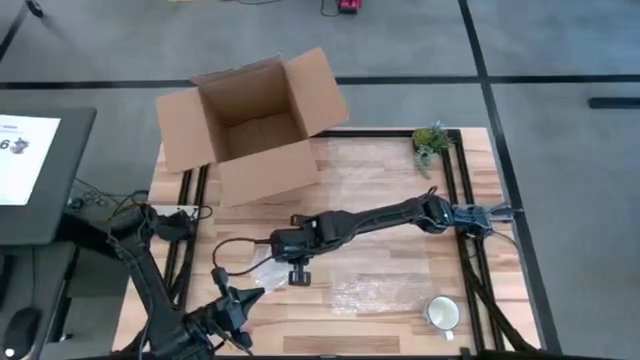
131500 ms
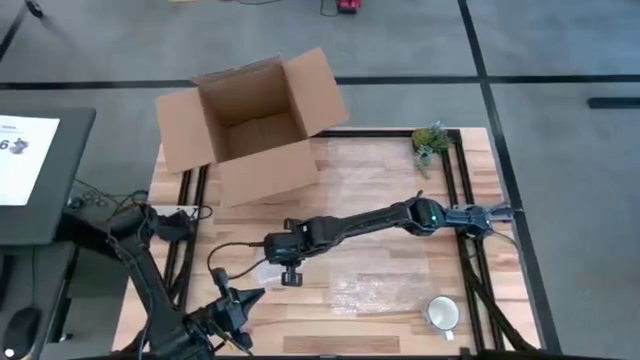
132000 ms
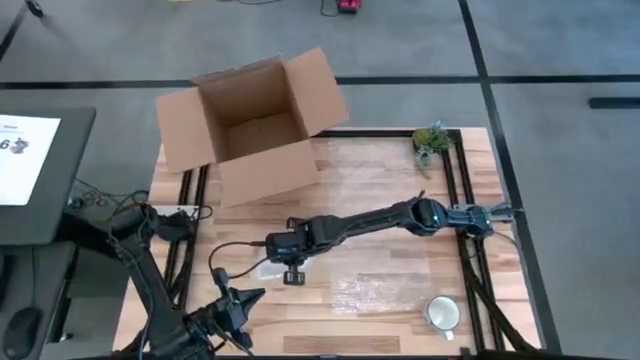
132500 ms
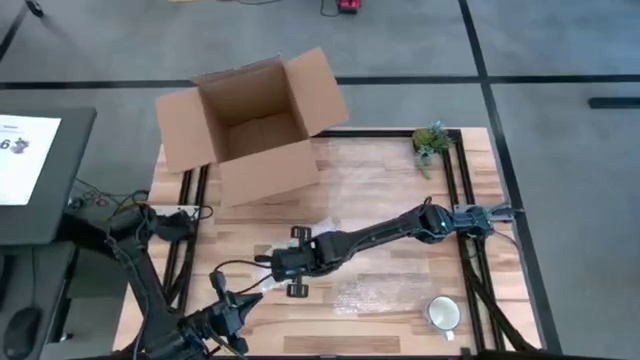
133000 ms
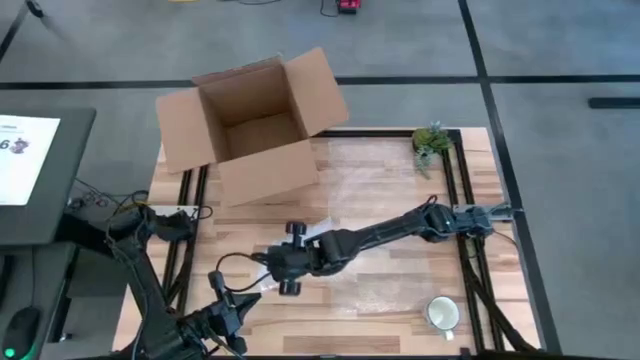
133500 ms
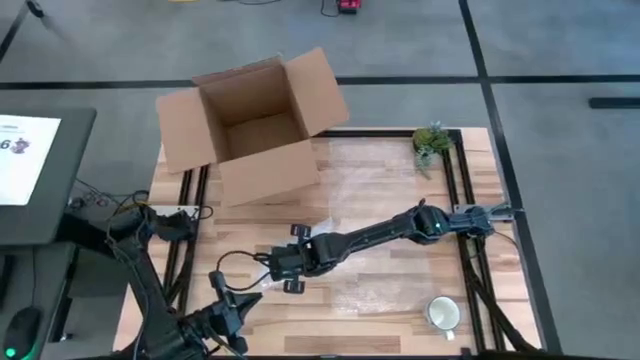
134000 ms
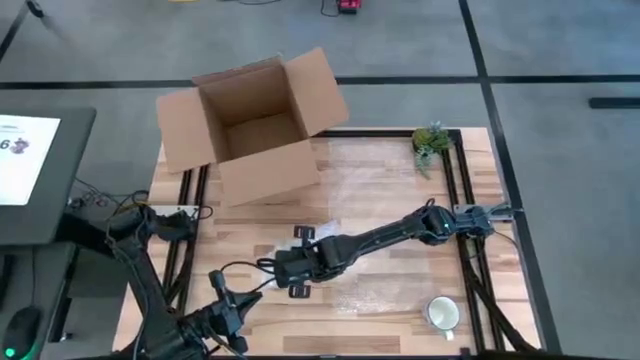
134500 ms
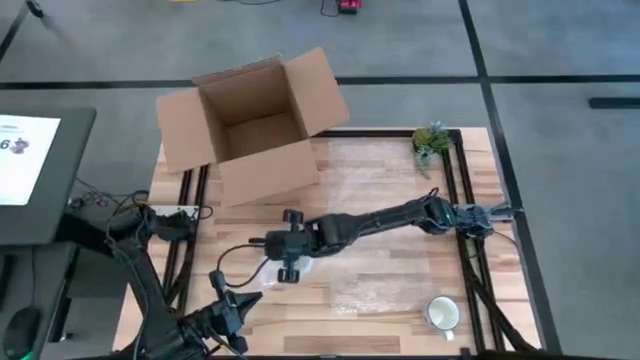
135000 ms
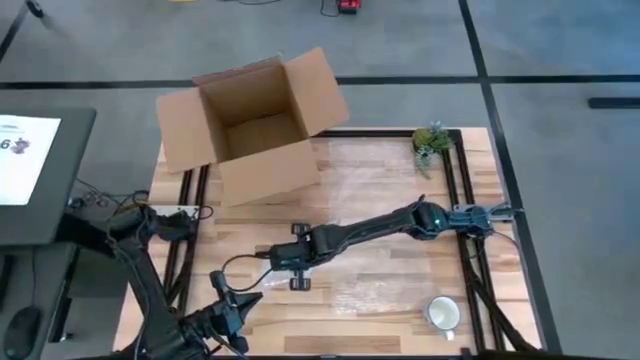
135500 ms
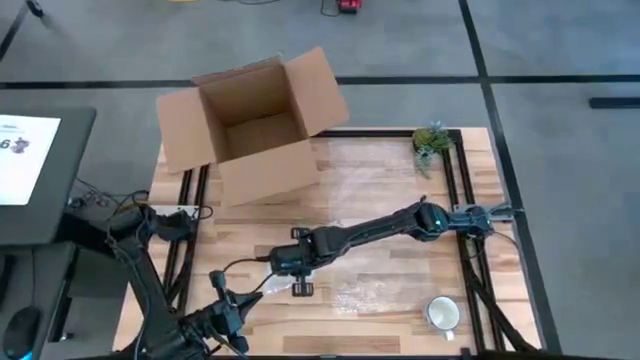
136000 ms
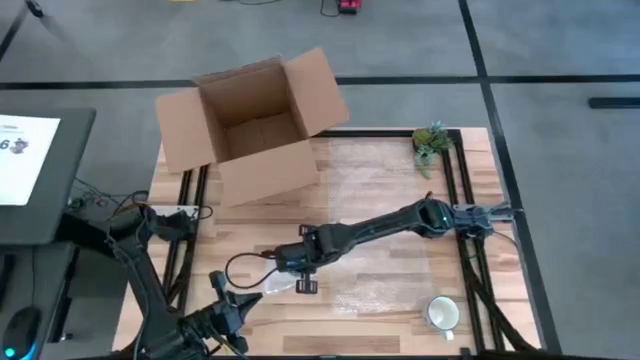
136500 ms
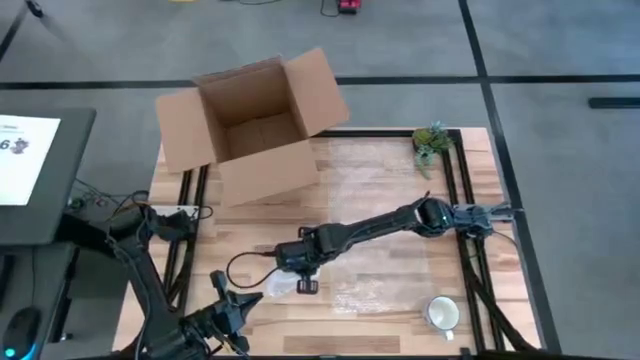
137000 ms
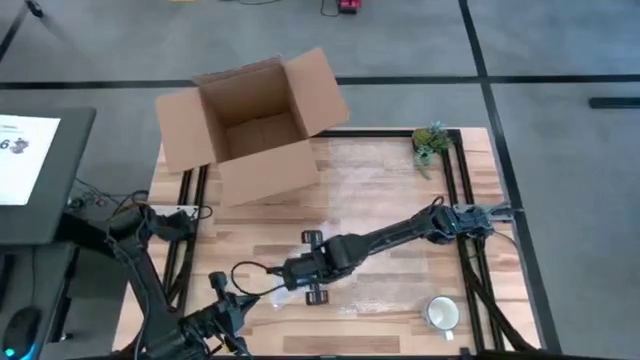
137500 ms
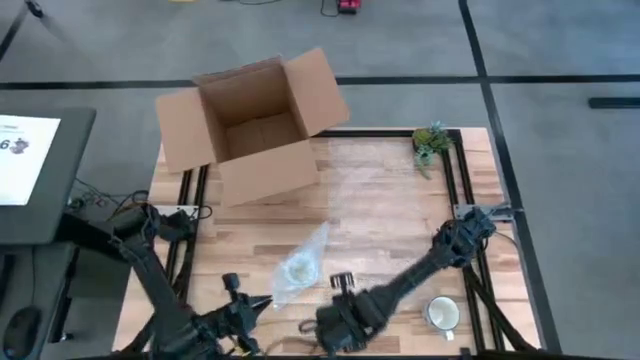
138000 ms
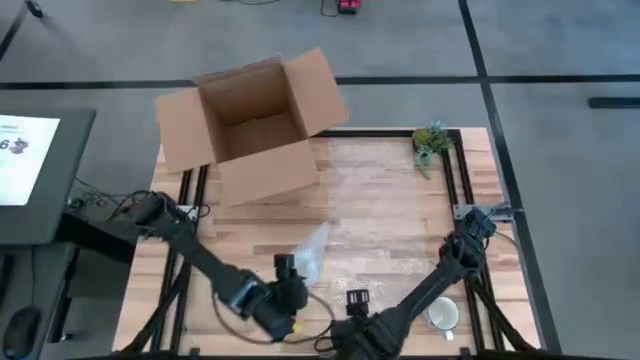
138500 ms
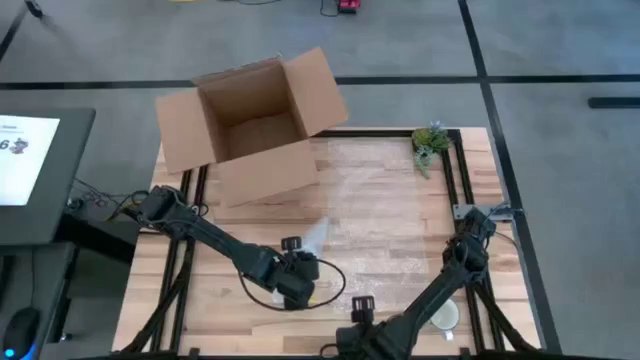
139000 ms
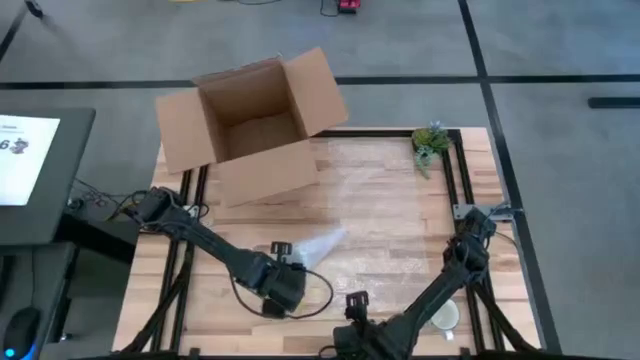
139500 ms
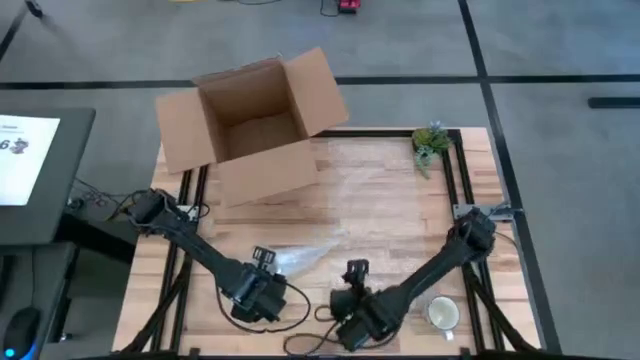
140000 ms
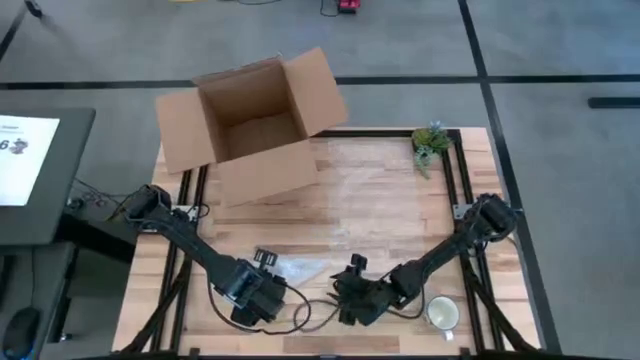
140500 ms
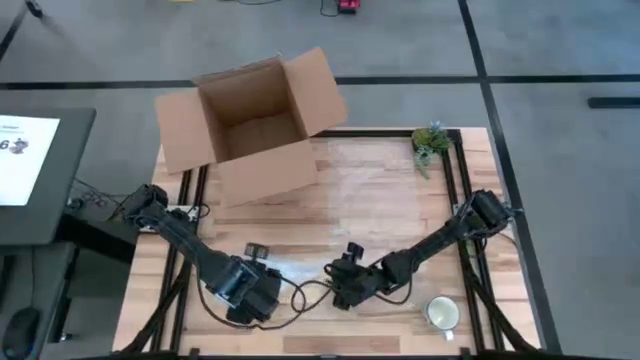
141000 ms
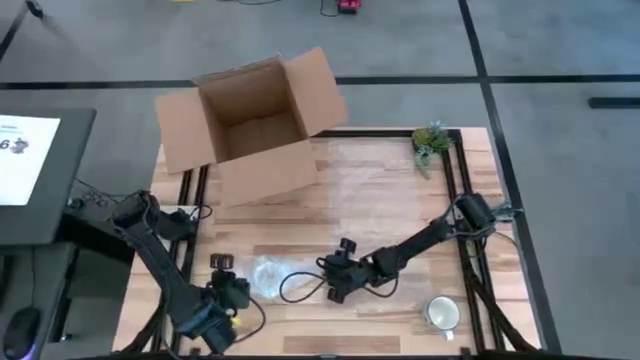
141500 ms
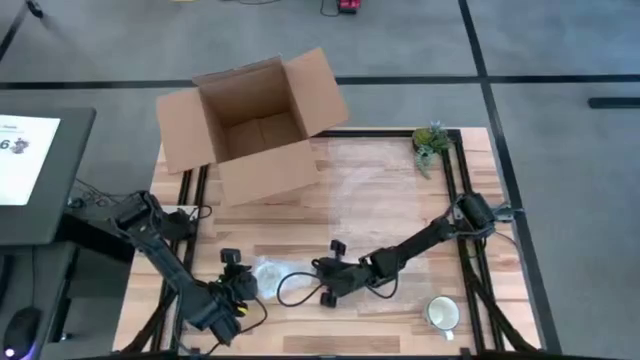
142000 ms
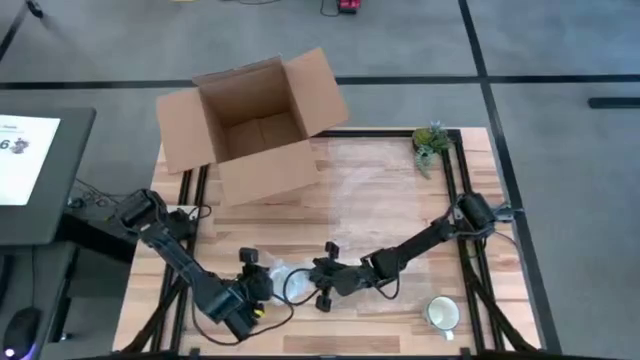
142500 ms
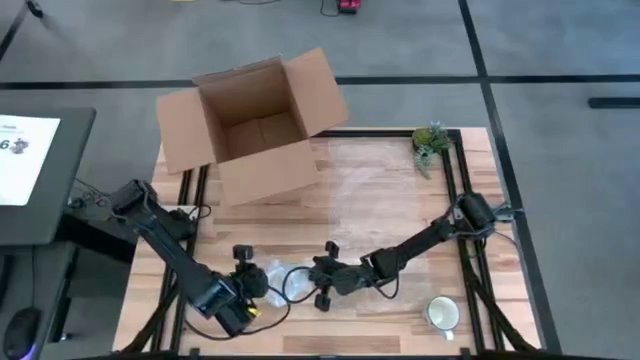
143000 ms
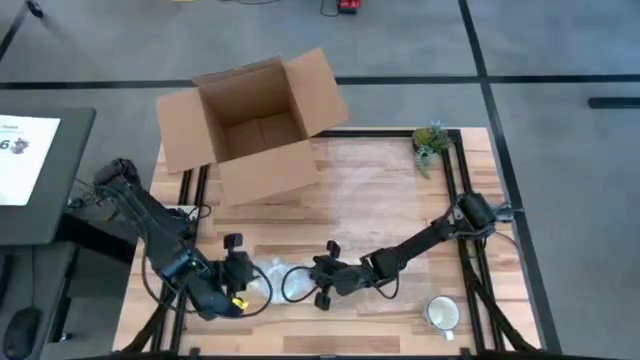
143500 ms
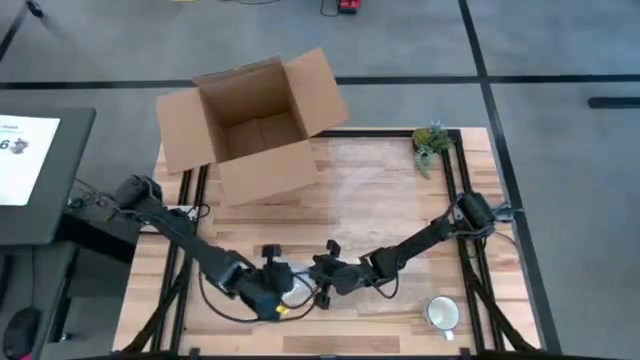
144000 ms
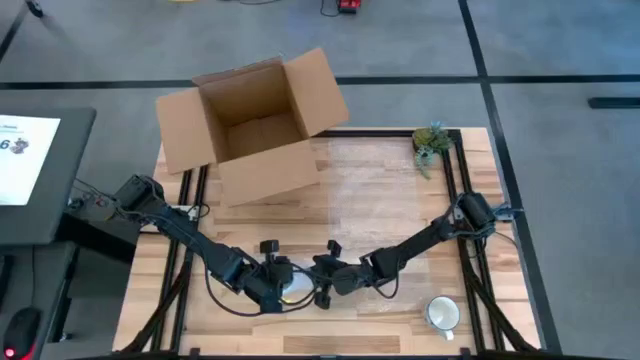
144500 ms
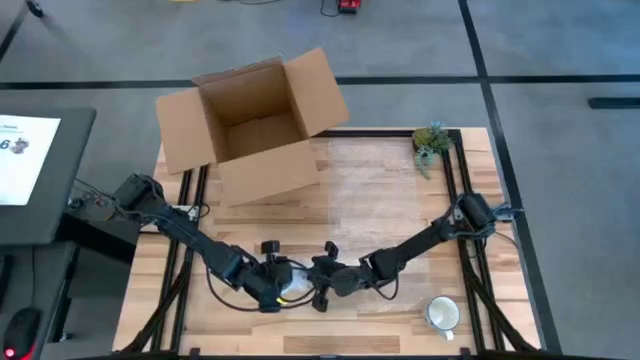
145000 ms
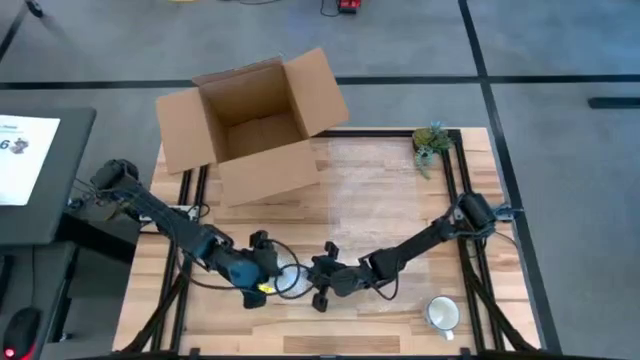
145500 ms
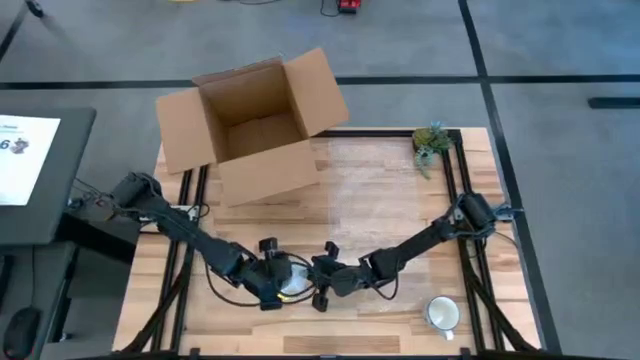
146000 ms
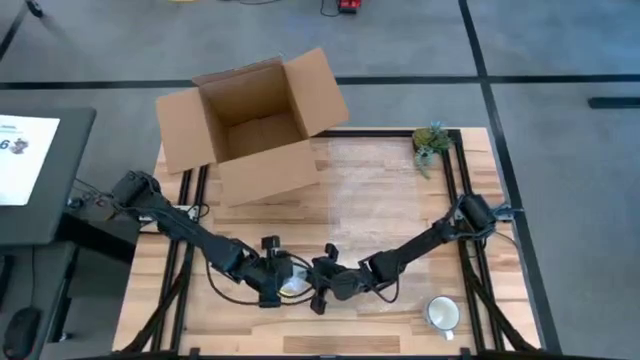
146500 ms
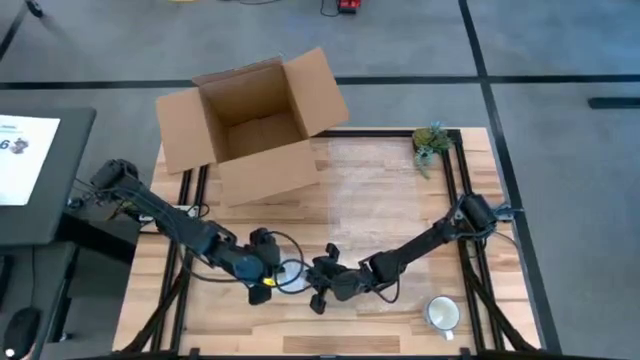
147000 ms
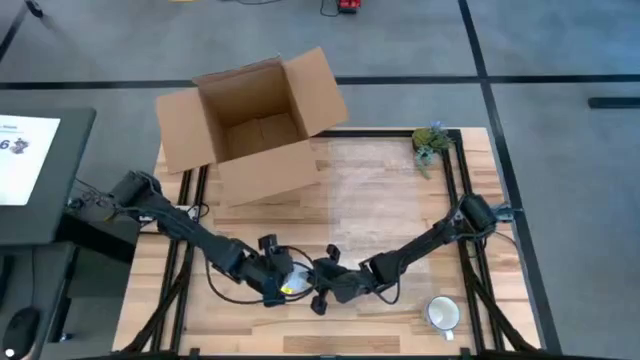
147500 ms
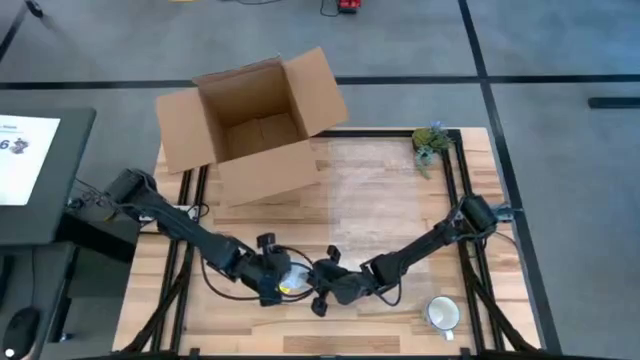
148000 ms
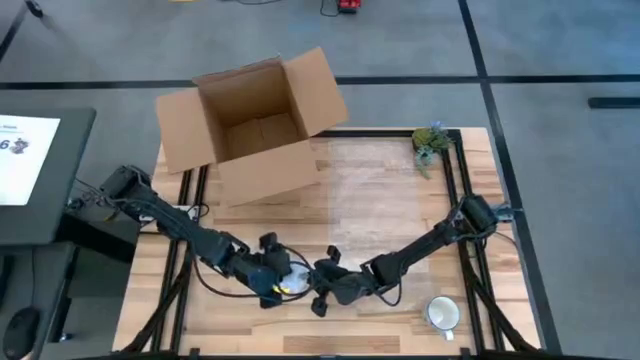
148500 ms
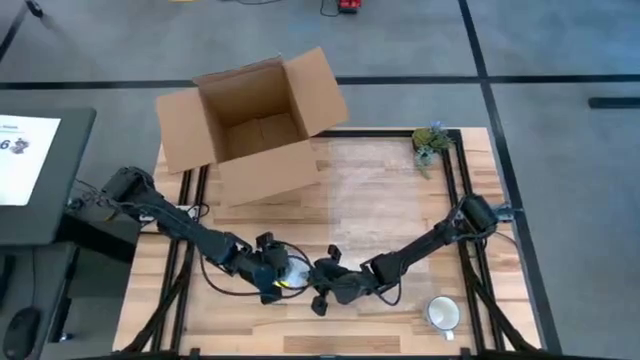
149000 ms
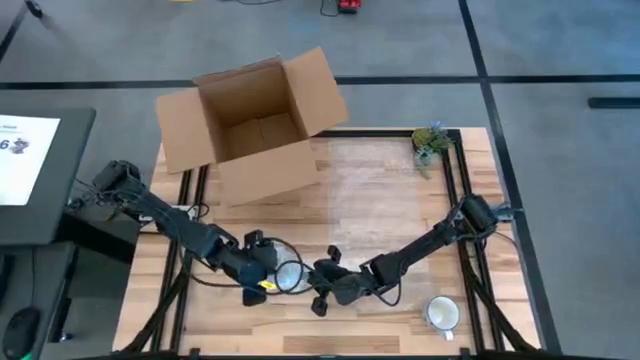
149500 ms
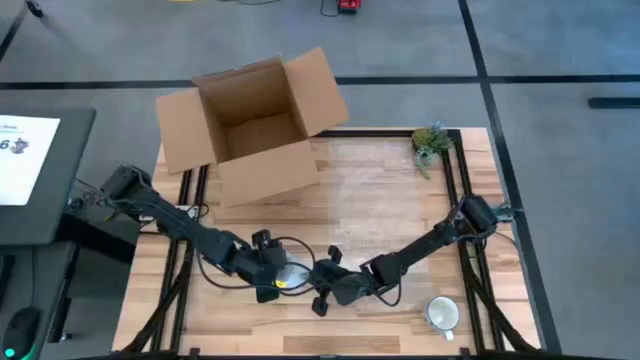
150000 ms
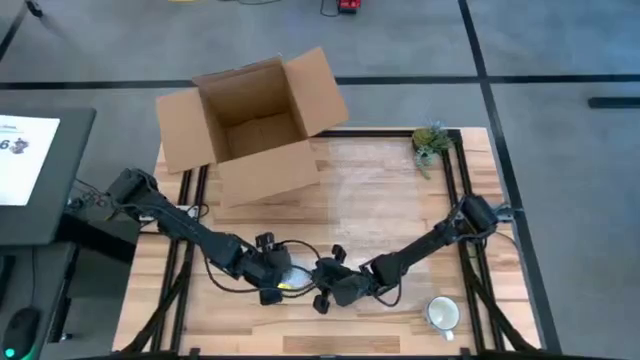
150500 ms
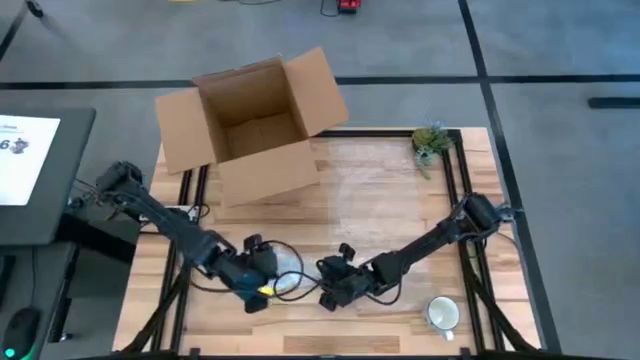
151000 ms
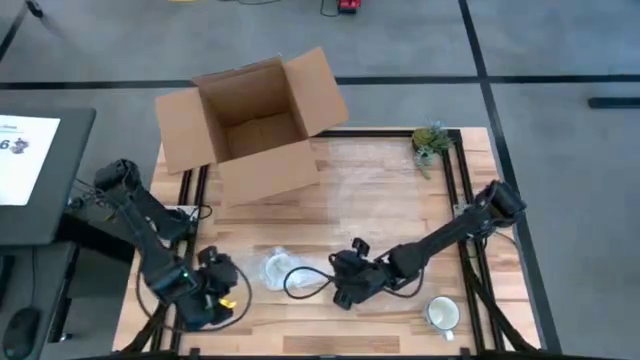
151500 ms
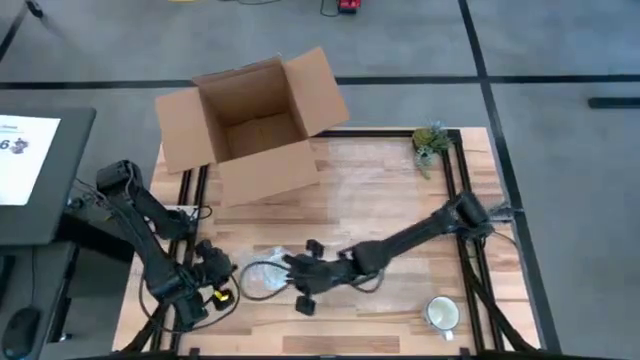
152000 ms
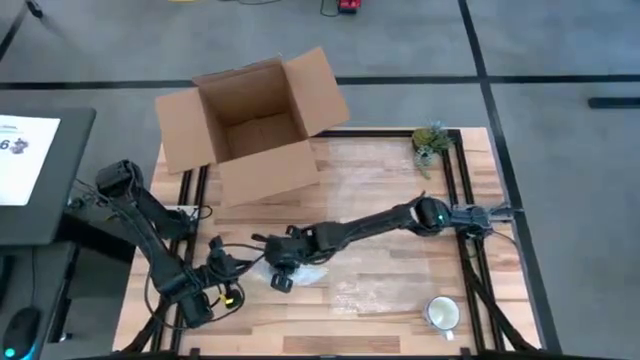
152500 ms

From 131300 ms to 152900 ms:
Task: wrap mug
Wrap the green patterned mug with the bubble wrap
